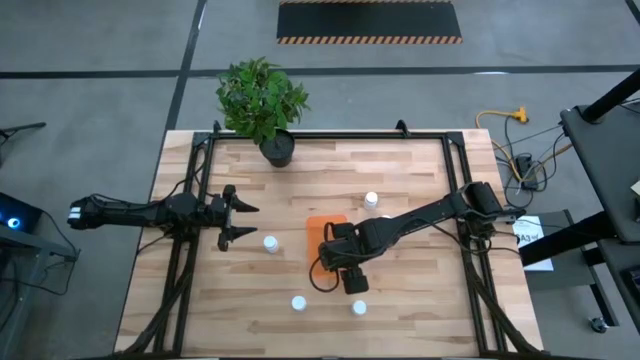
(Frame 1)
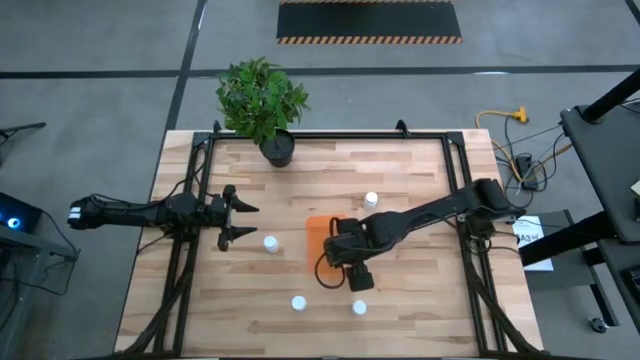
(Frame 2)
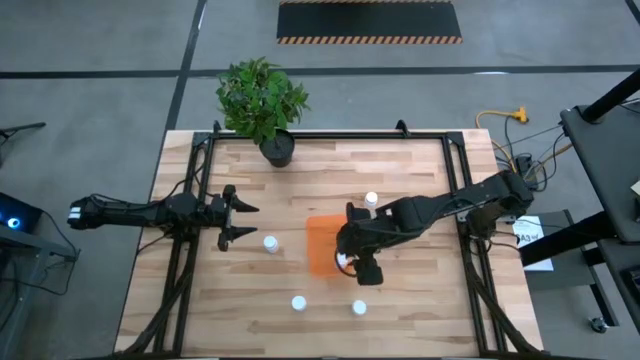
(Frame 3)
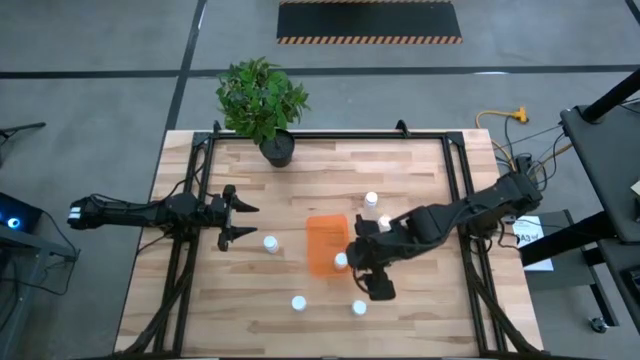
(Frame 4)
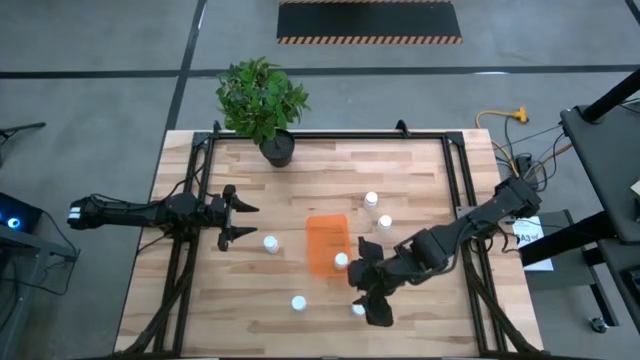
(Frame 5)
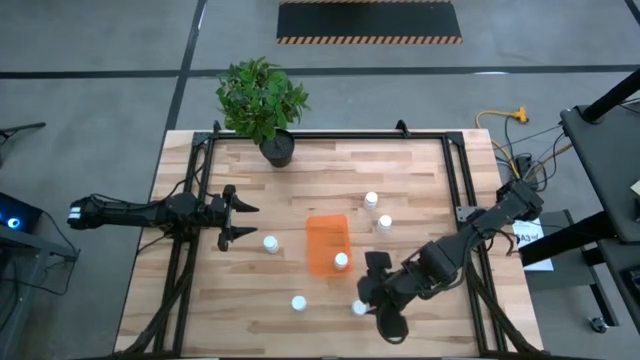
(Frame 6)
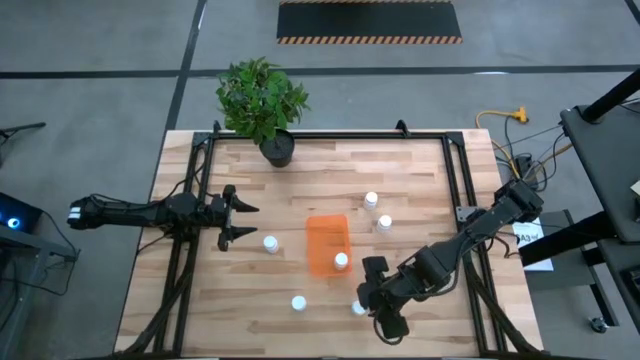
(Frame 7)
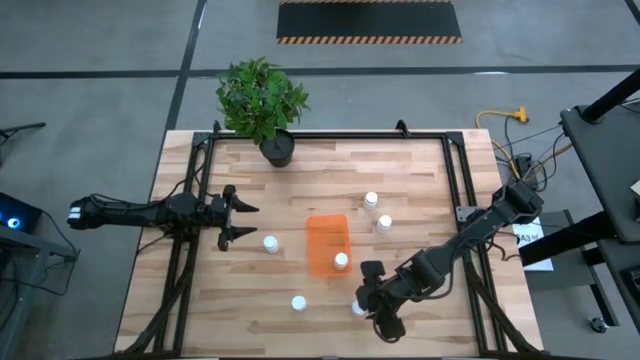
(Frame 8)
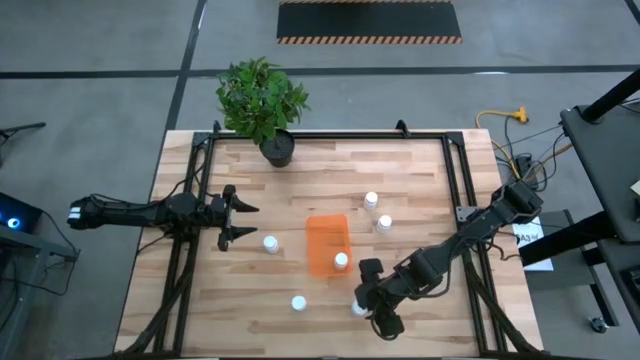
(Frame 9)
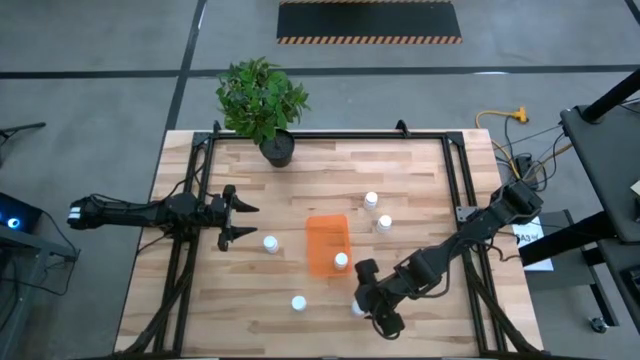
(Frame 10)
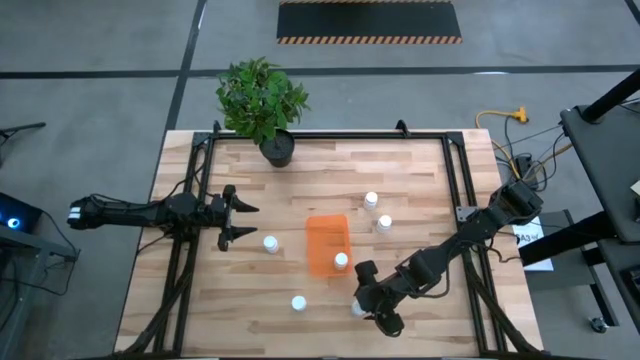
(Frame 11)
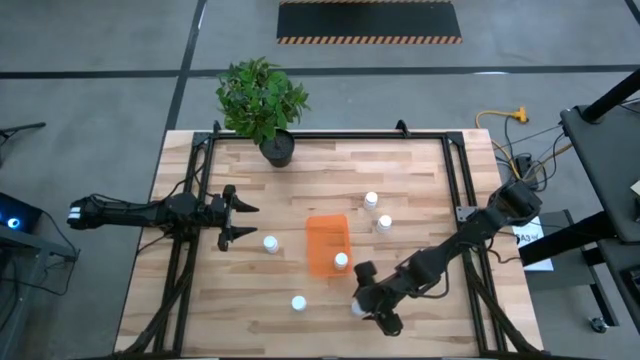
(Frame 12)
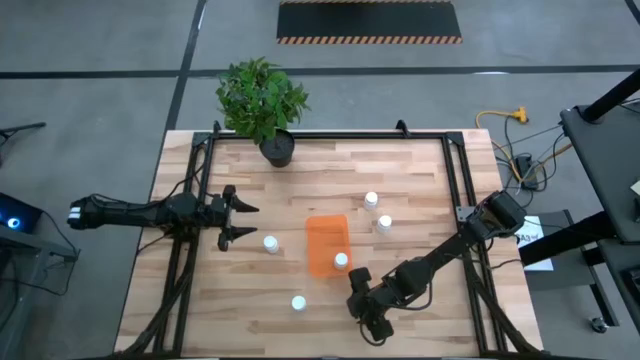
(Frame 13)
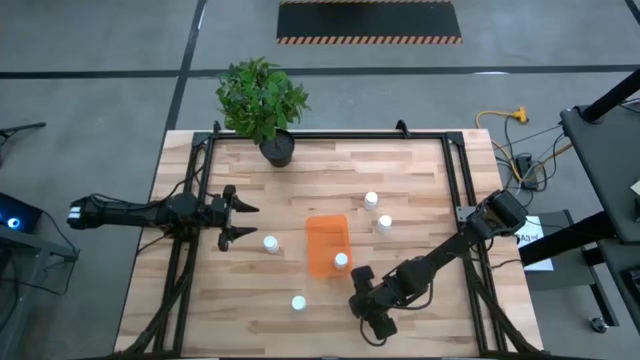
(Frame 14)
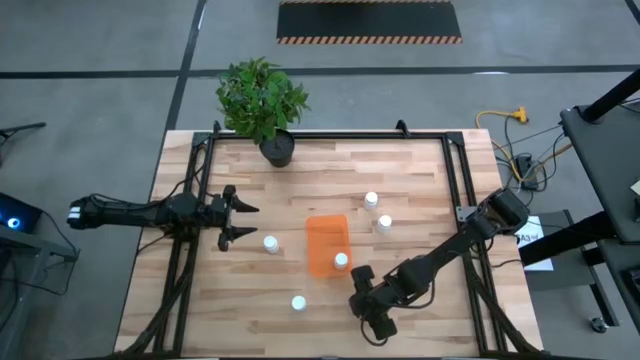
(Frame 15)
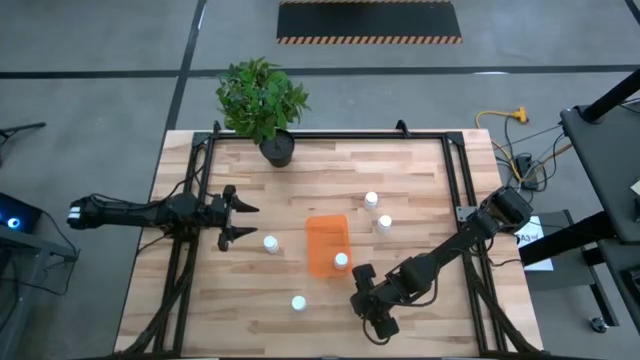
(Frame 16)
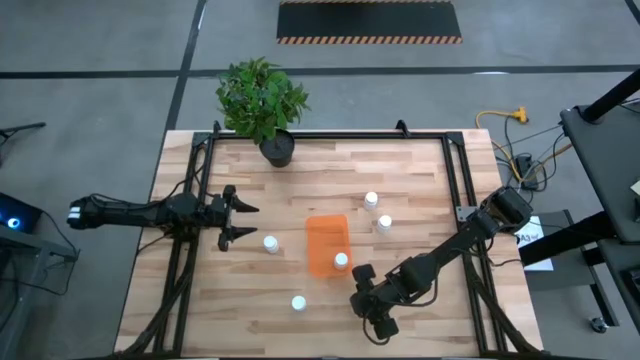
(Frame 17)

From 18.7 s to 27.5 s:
Task: Pick and place pill bottles into a basket
Put the white pill bottle into the orange container

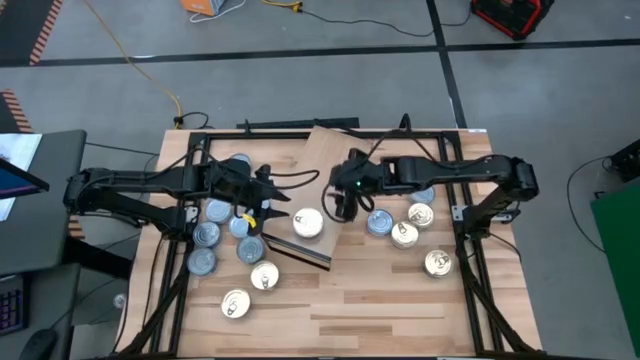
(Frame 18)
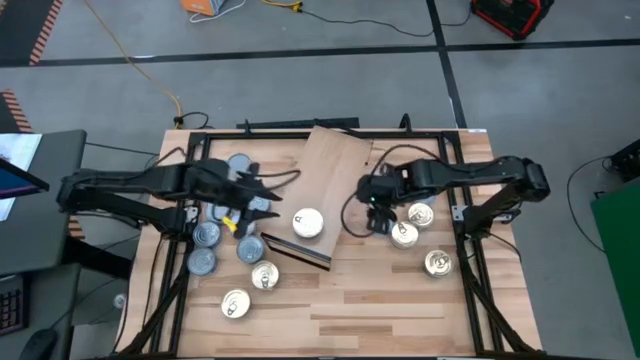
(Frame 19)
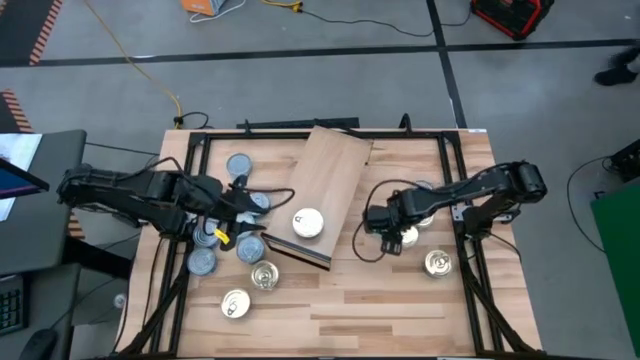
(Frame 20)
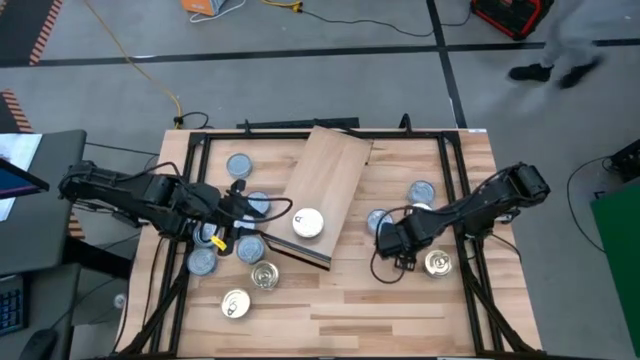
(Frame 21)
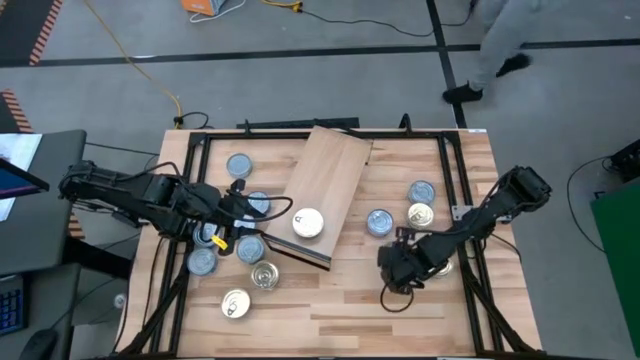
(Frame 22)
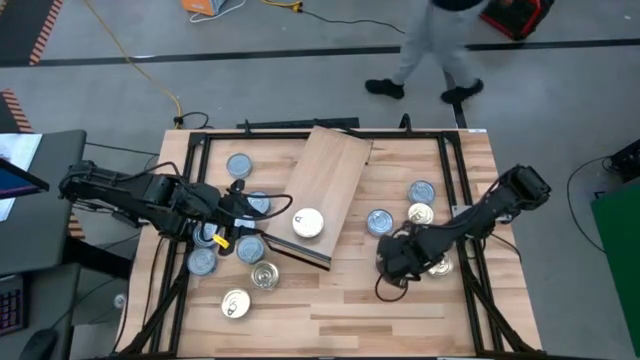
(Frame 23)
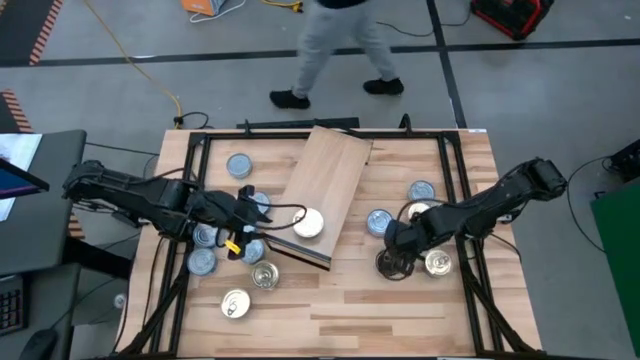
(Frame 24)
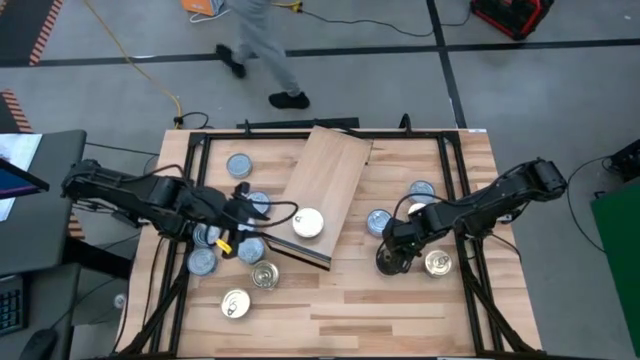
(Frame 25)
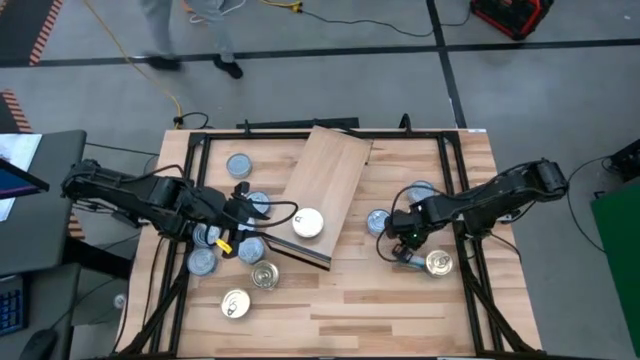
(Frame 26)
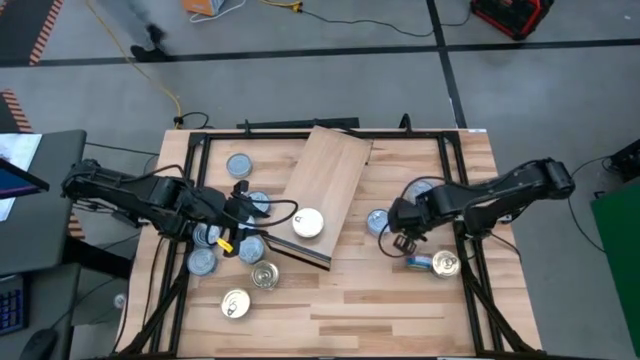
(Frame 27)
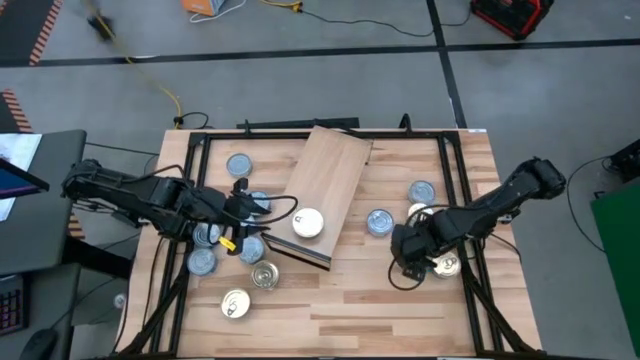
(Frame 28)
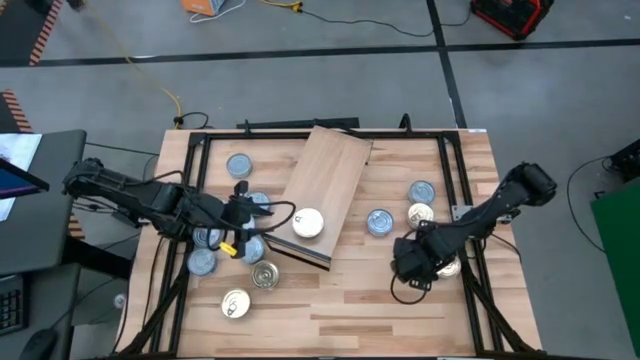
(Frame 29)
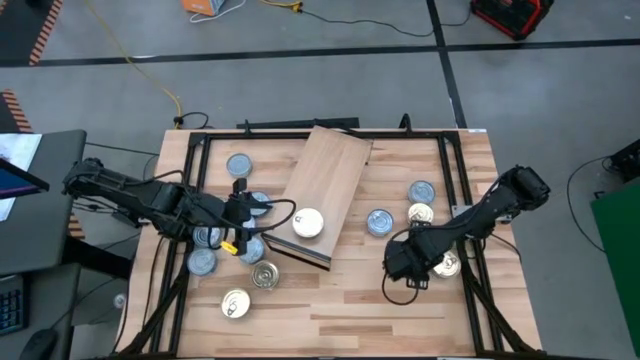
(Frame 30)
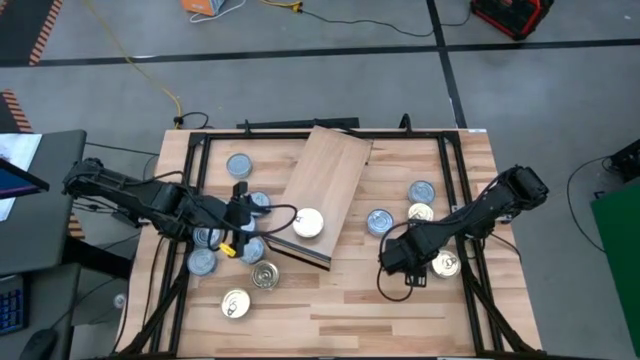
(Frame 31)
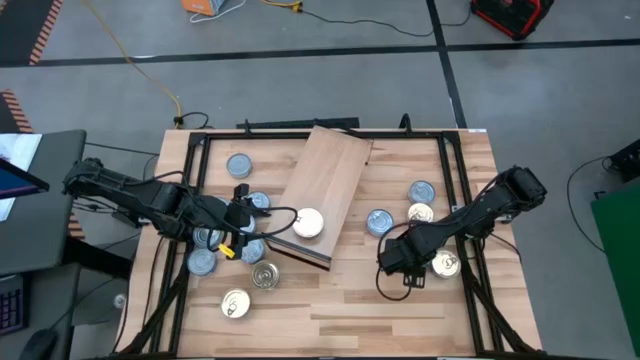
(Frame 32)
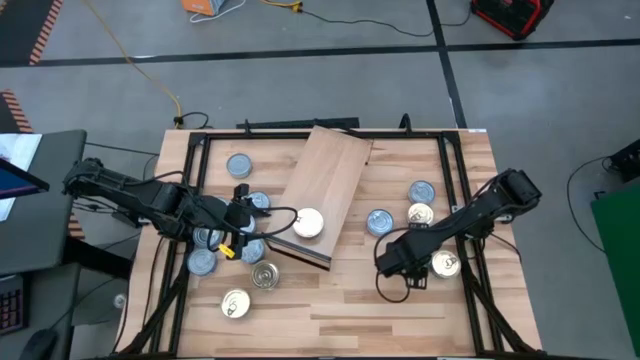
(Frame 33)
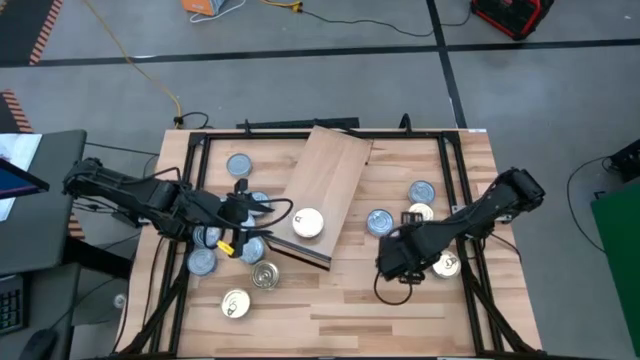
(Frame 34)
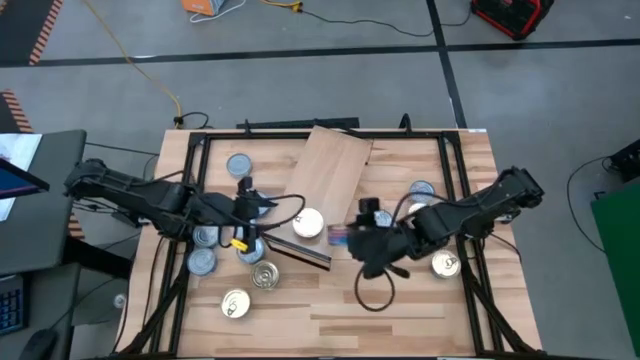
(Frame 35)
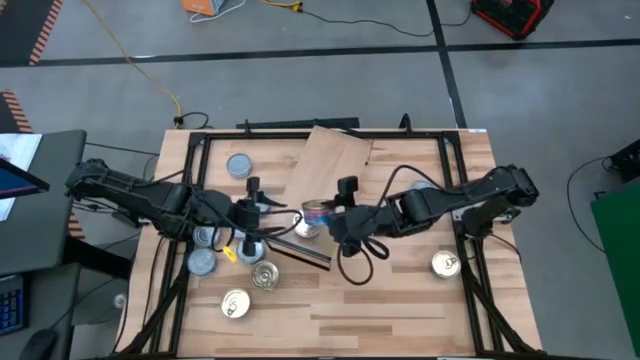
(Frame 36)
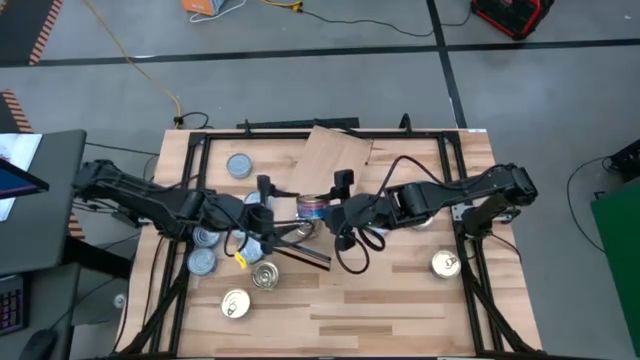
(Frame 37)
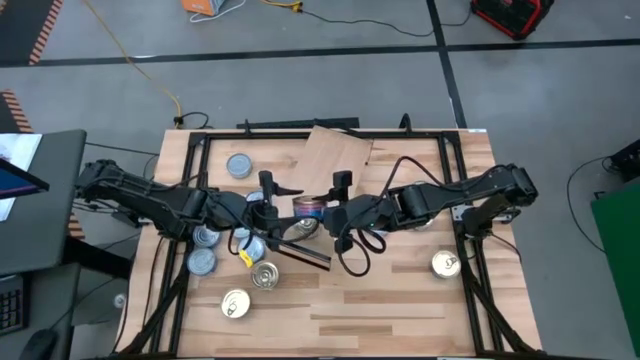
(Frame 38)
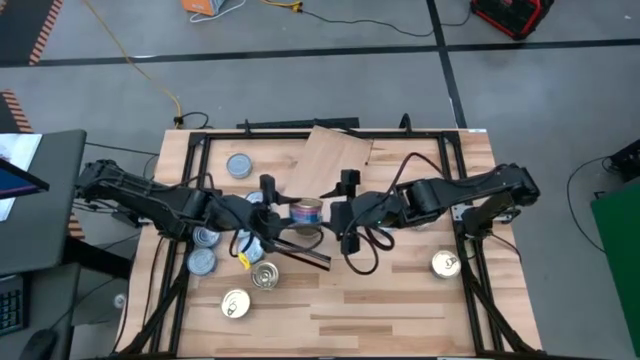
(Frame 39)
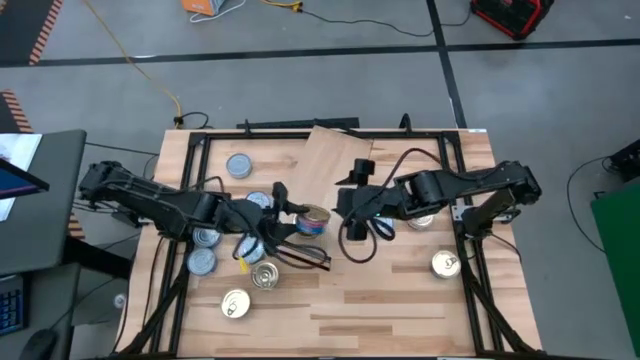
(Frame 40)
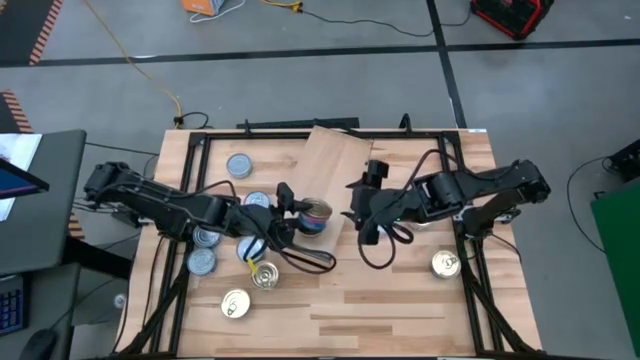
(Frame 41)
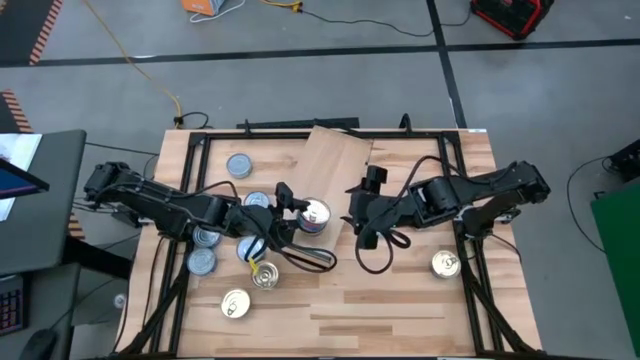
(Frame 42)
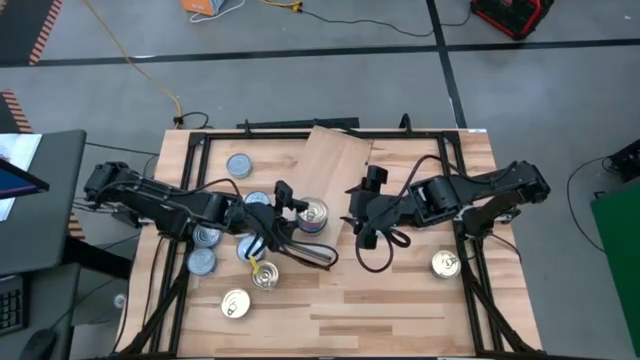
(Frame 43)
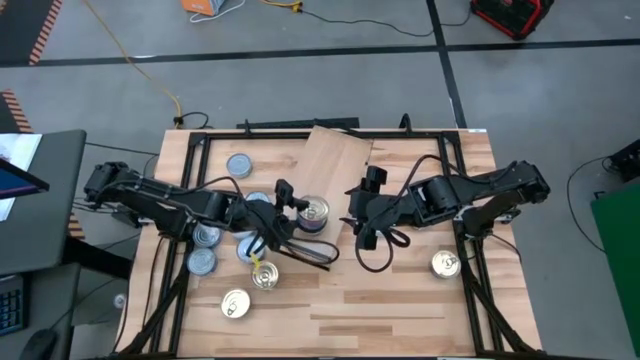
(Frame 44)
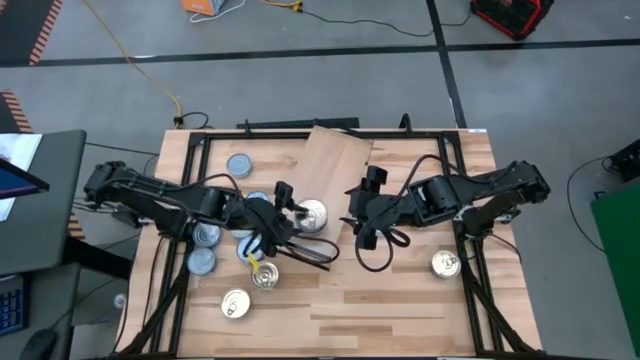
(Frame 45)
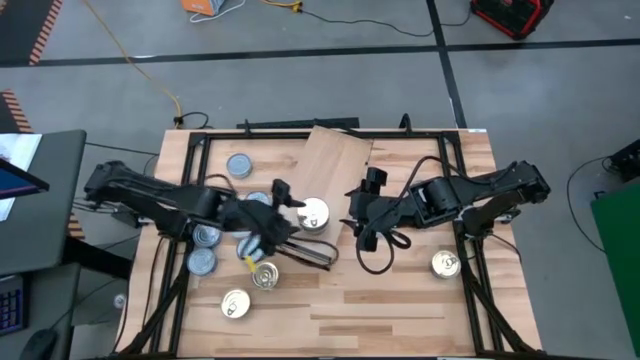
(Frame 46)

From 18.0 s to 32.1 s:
Task: Stack canned seafood by type on shelf
Stack the blue pink tuna can on top of the blue pink tuna can on the shelf
